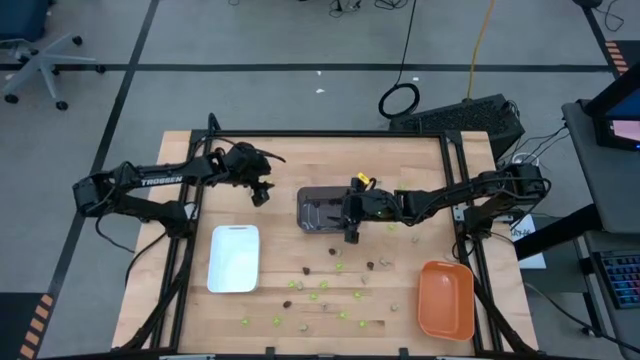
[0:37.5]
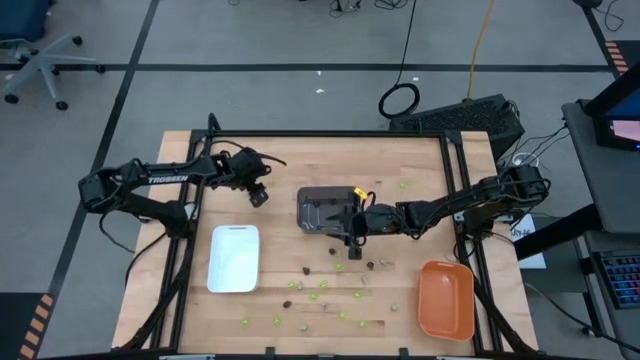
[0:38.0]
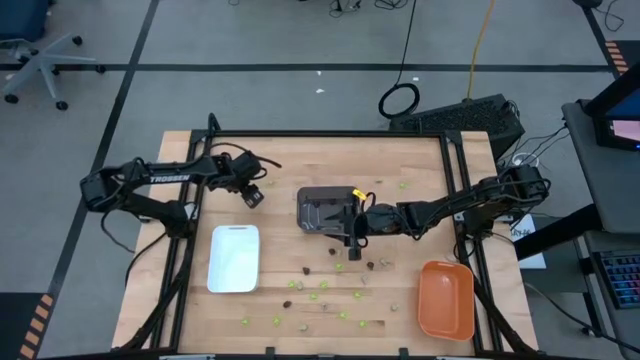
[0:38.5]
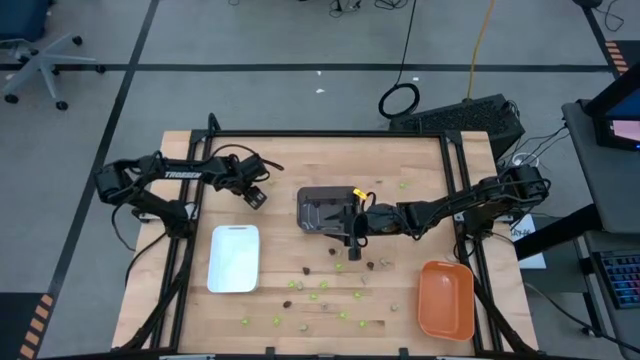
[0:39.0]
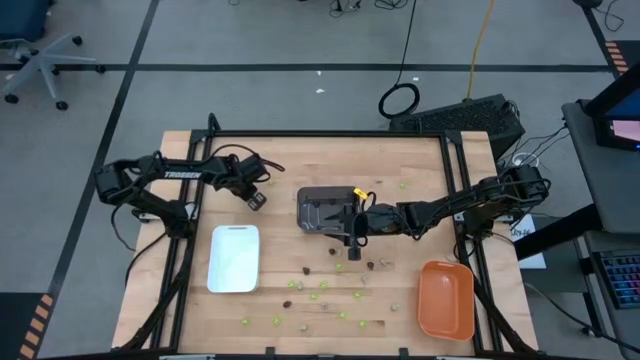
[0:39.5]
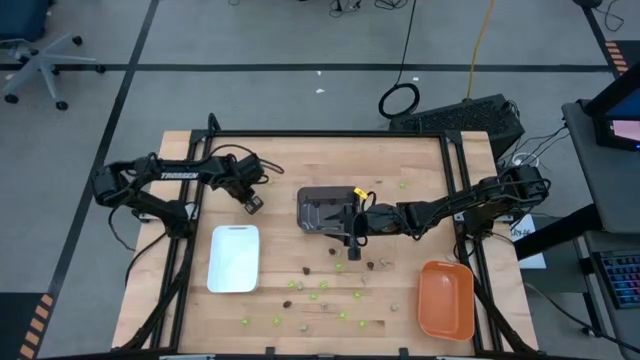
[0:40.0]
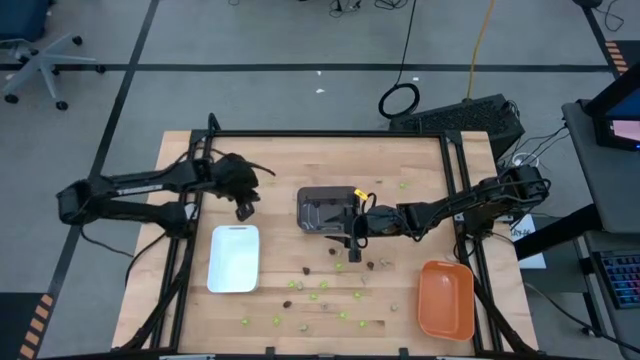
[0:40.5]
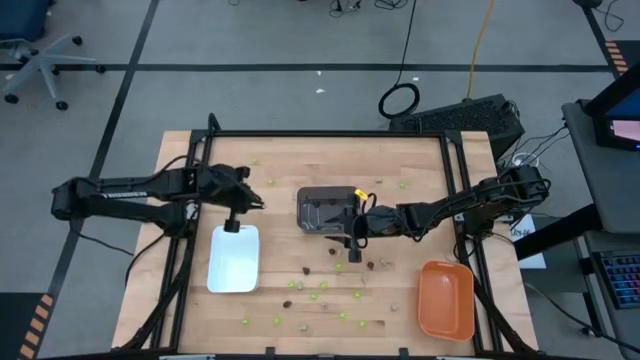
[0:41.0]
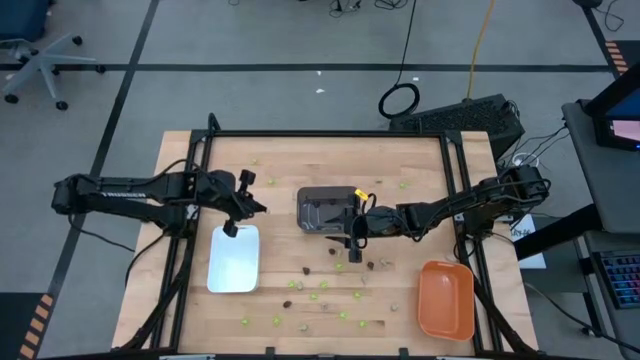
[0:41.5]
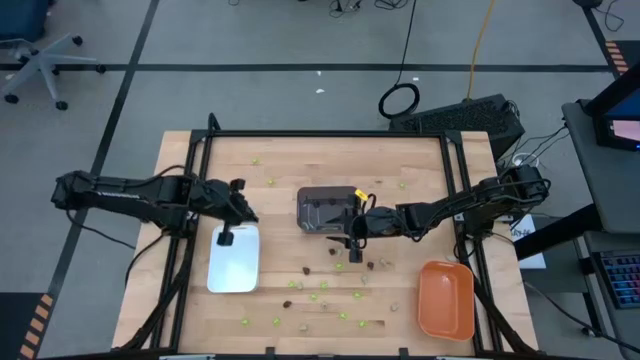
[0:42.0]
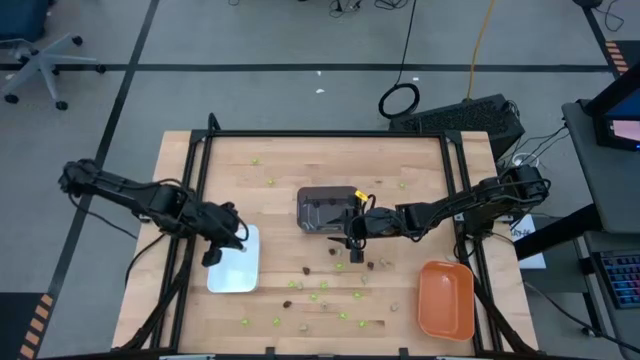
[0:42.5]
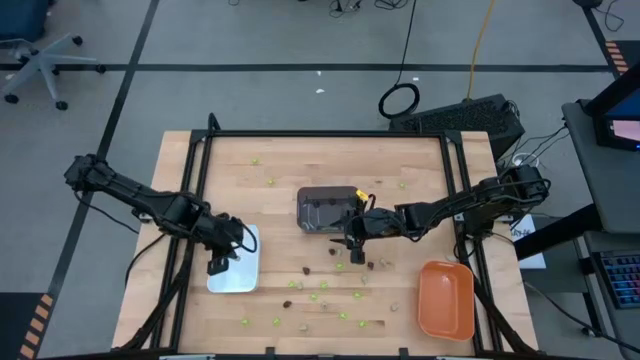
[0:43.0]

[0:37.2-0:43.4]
Task: Sort Halloween decoration
Put the white skull toy into the white bin

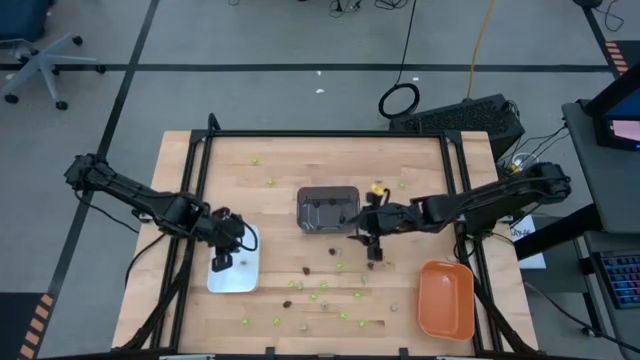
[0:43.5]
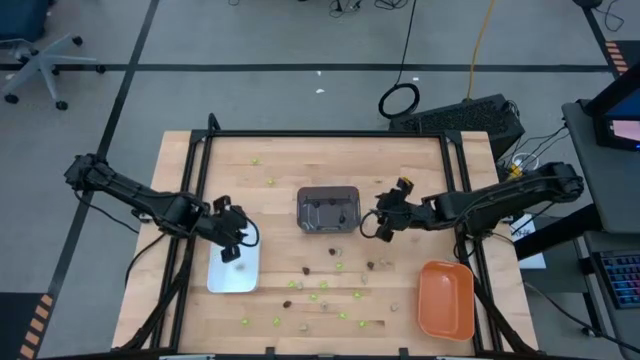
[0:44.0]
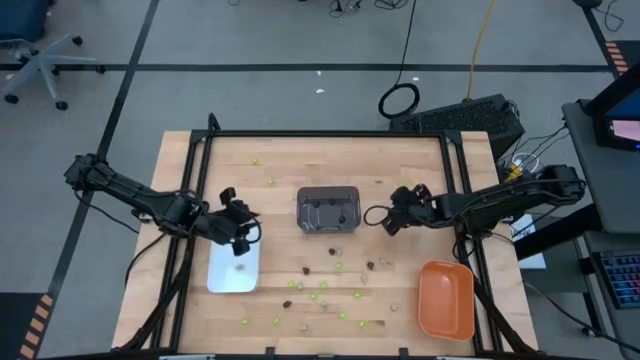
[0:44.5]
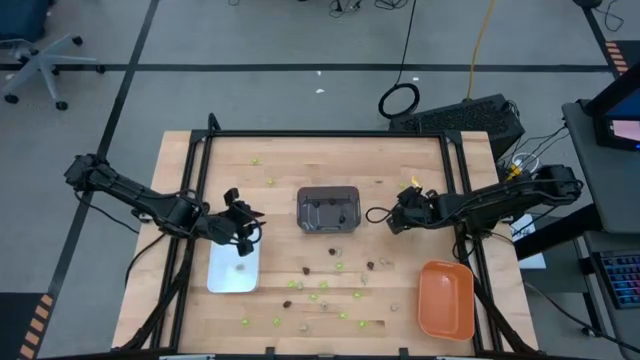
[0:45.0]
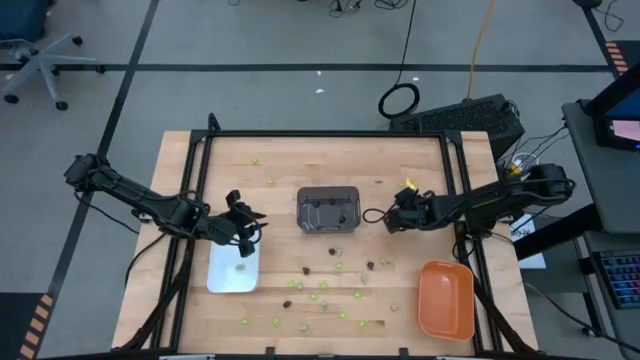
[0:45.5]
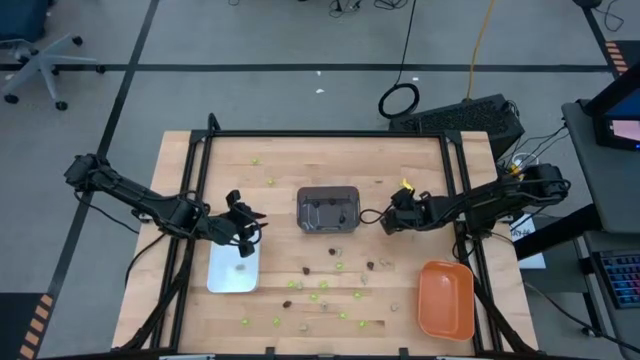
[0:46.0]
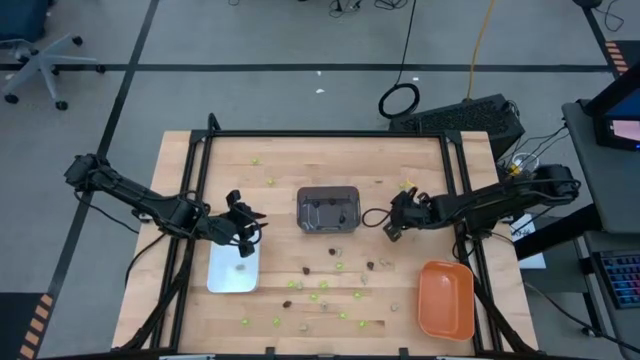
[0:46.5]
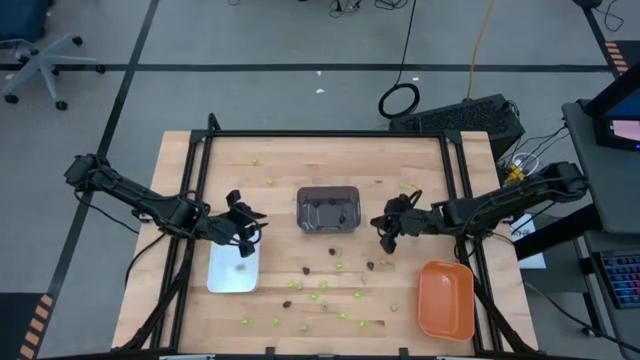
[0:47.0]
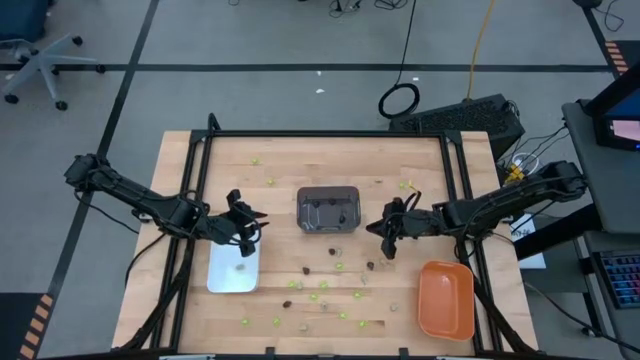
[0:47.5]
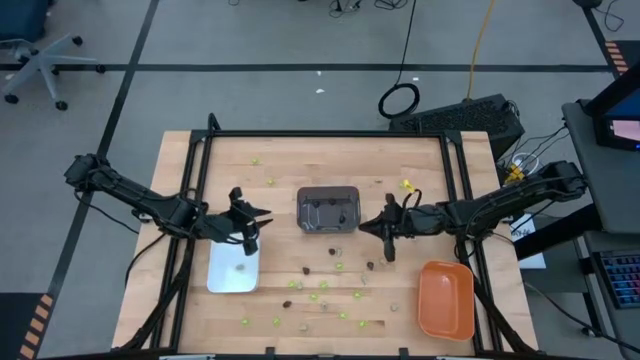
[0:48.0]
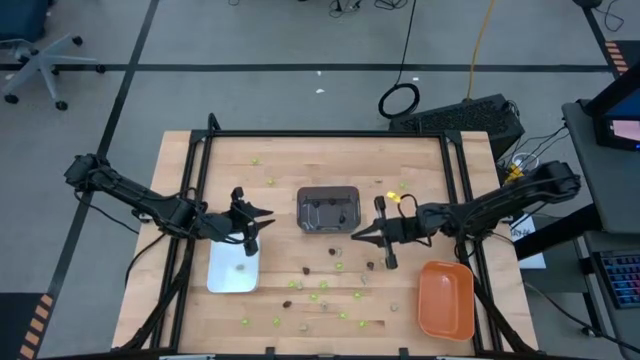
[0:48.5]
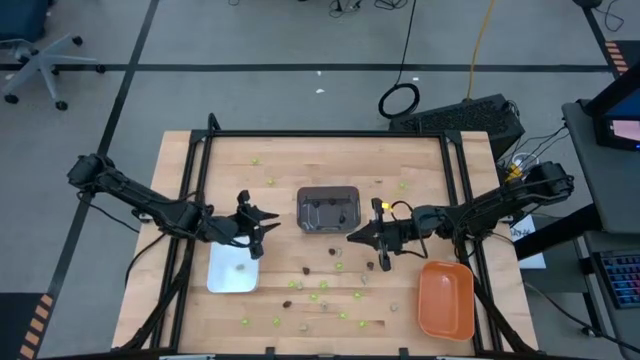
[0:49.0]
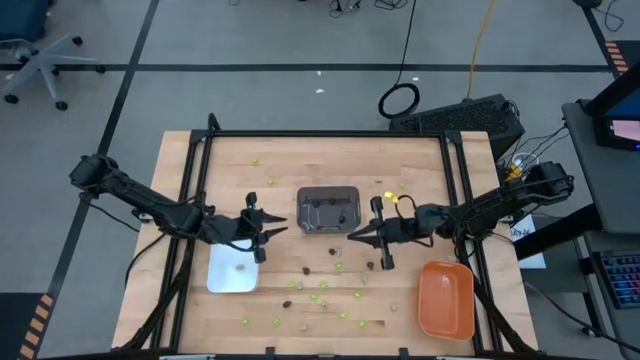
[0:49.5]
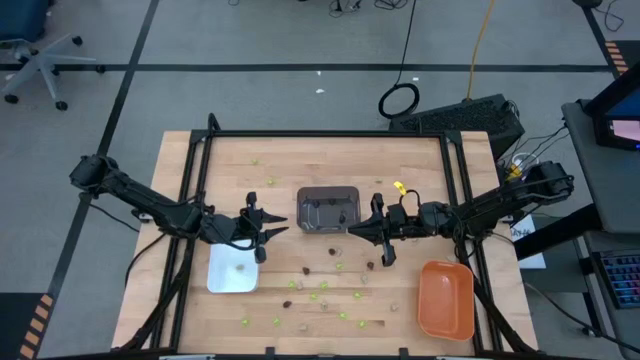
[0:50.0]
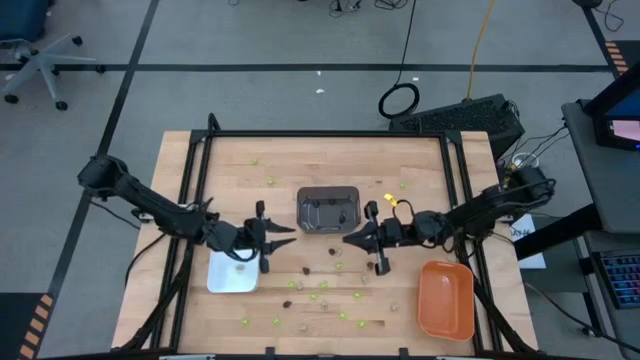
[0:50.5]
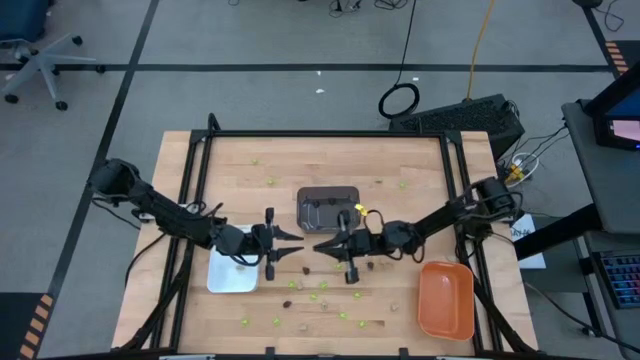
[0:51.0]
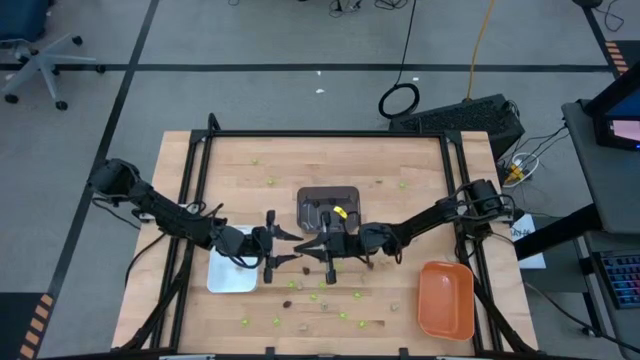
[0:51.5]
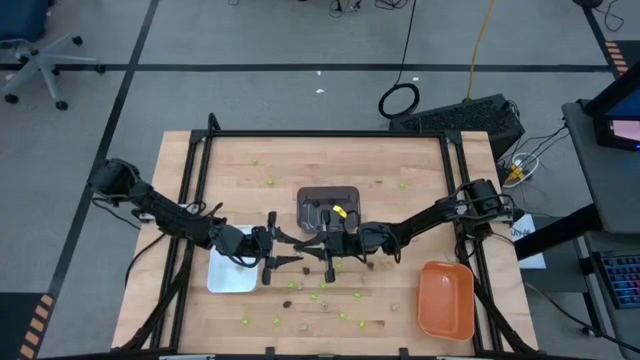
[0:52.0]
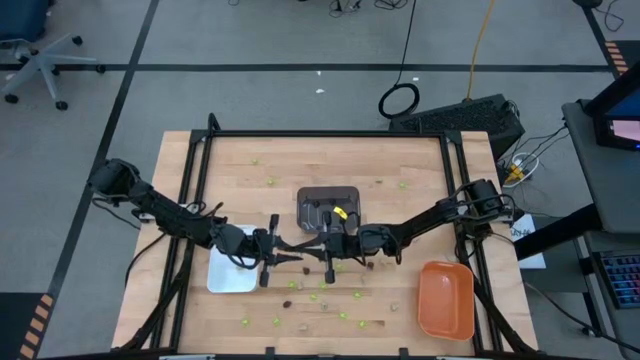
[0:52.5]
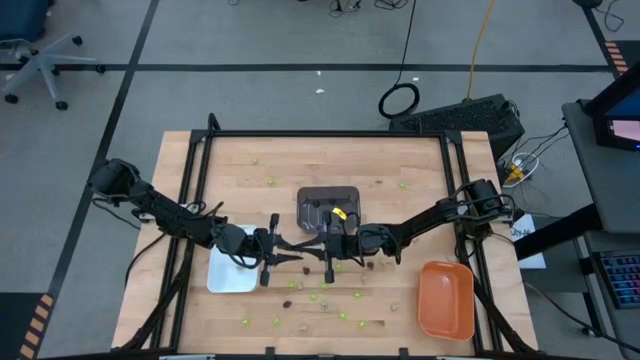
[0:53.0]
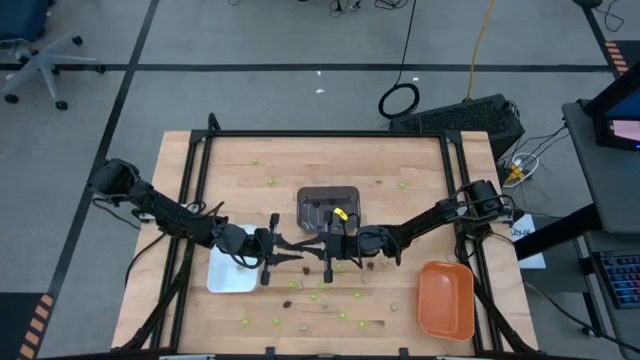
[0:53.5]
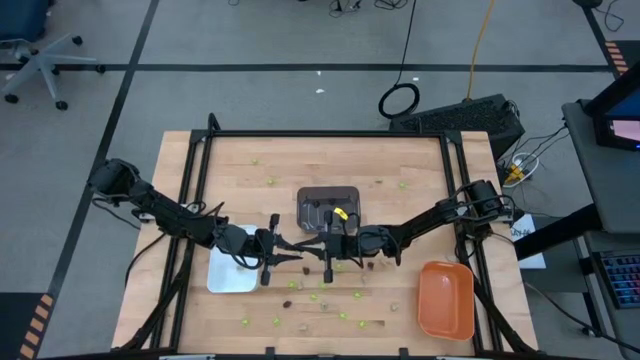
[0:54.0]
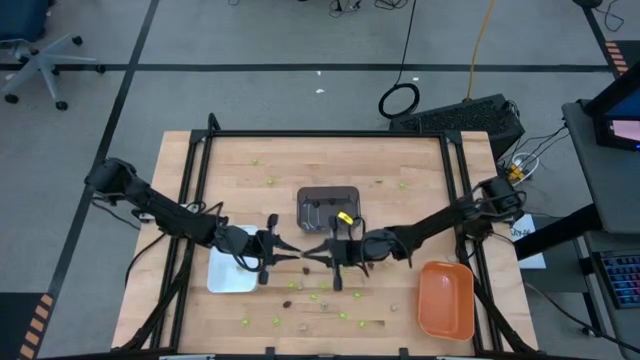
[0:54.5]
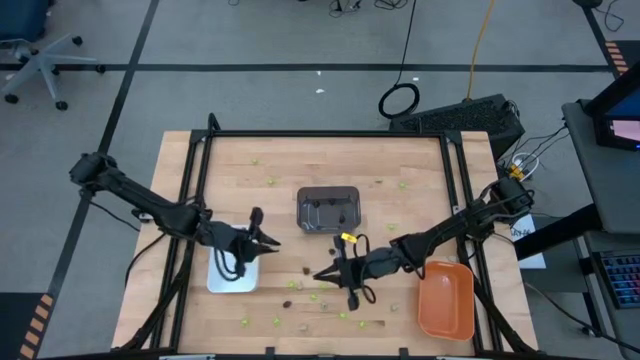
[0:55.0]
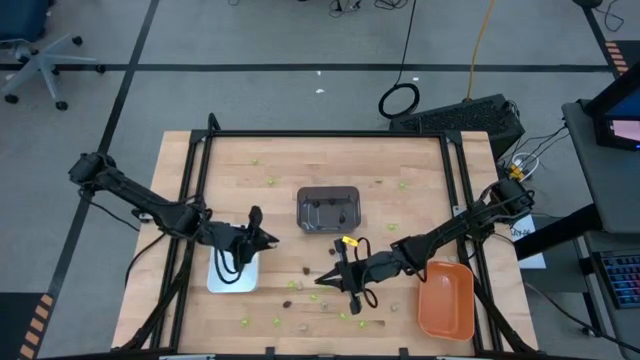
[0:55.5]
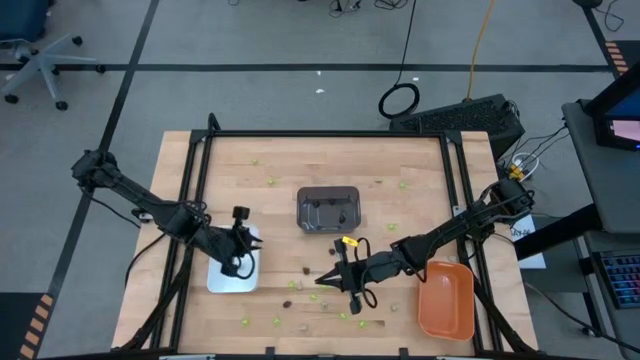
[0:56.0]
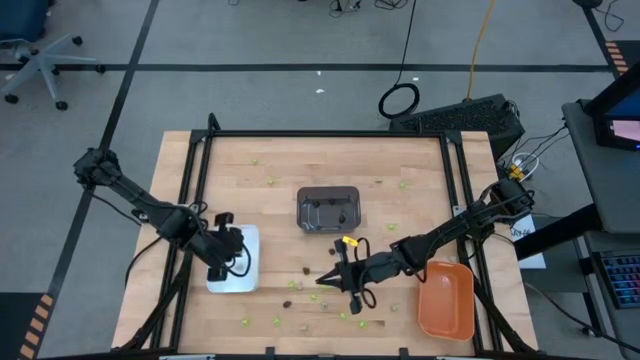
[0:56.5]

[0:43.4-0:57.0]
Put the white skull toy into the white bin

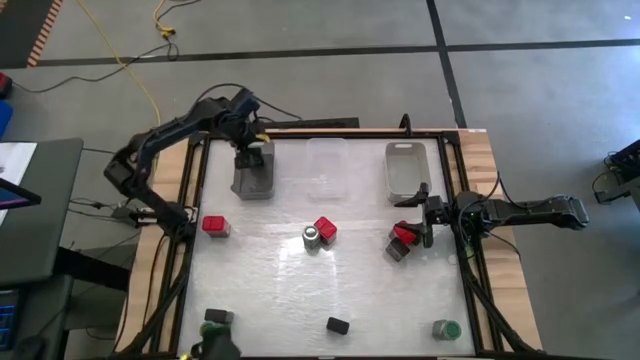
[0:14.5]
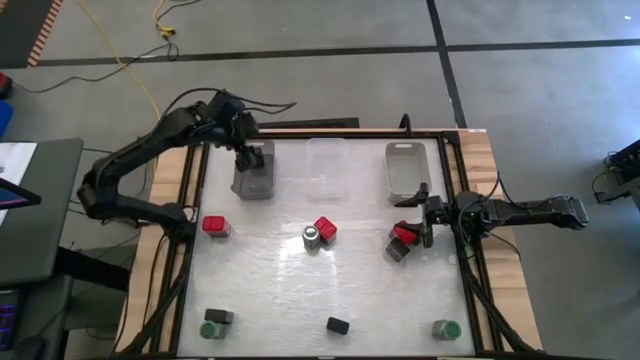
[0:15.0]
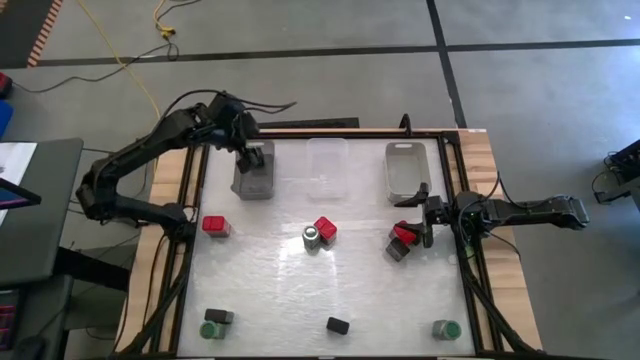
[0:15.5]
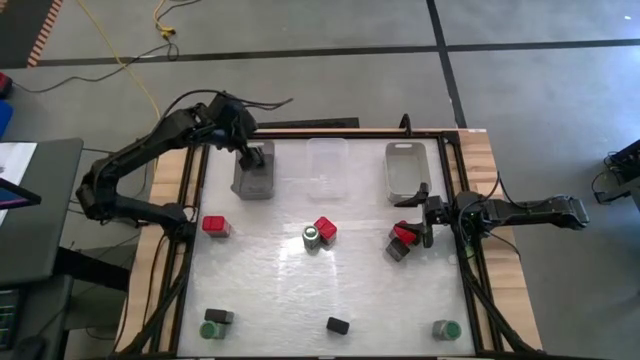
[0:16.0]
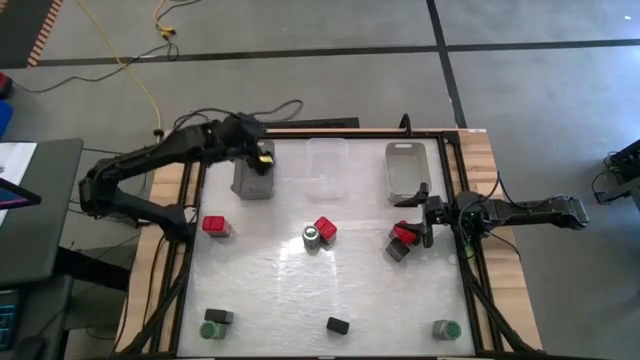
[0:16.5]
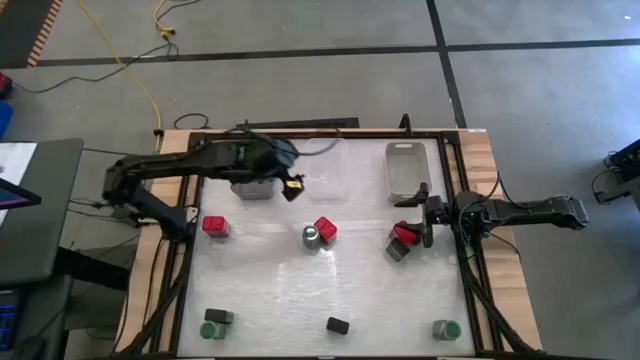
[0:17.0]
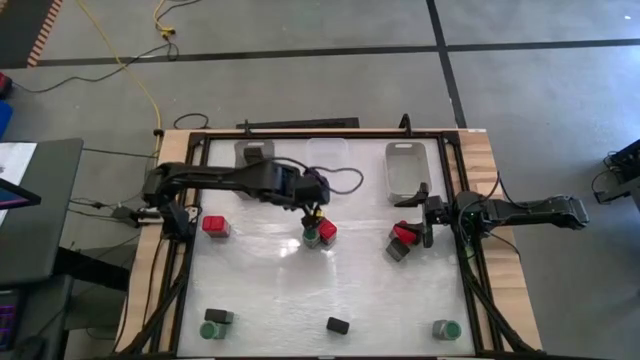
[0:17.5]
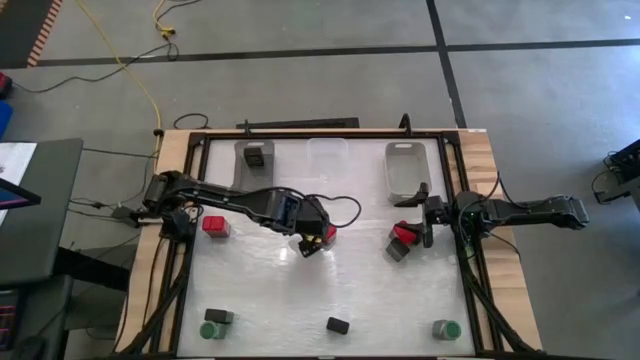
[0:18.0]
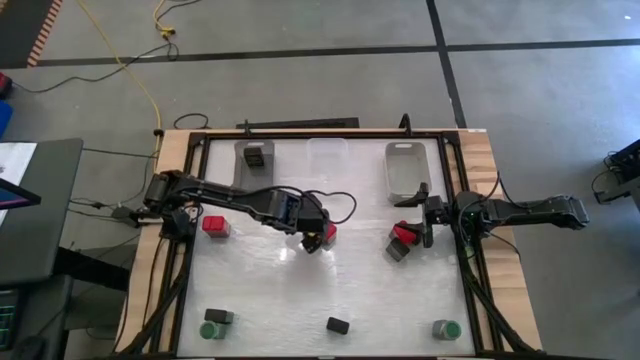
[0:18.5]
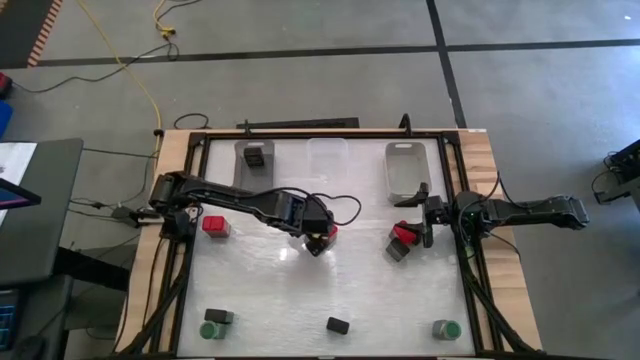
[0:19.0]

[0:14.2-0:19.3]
Task: Sort spices by type
Put the green seasoning bottle into the gray bin
